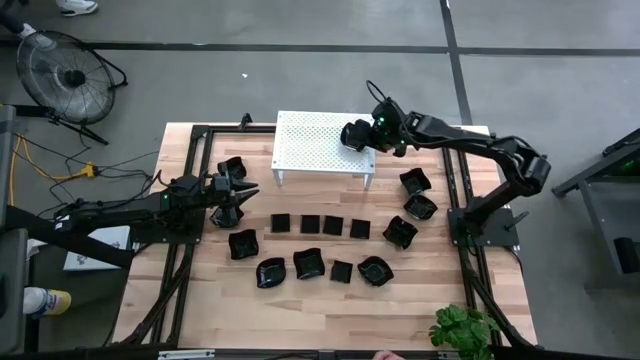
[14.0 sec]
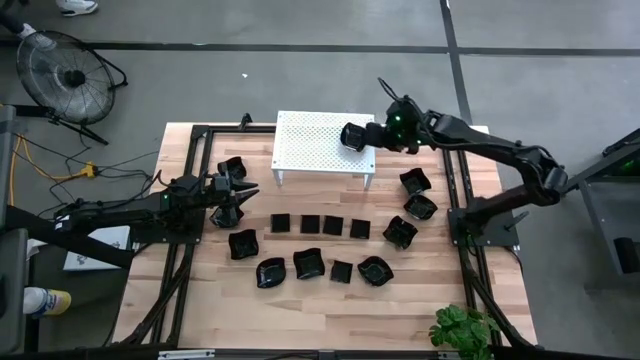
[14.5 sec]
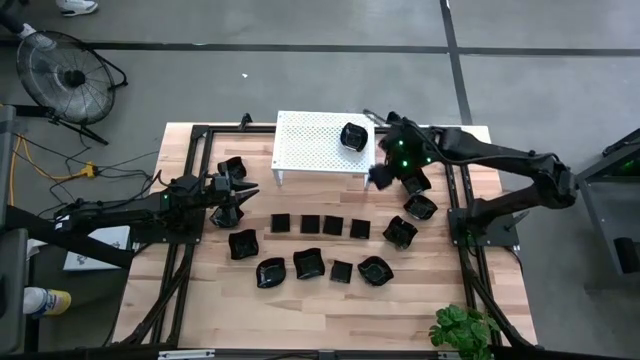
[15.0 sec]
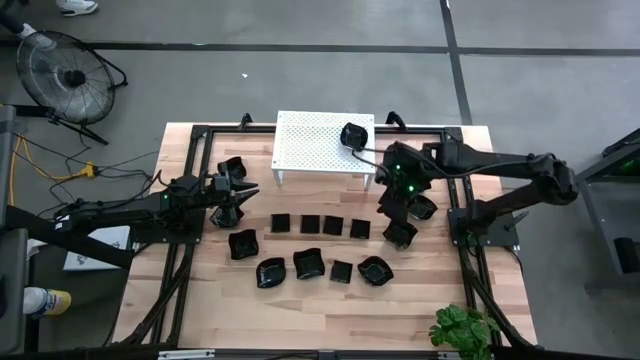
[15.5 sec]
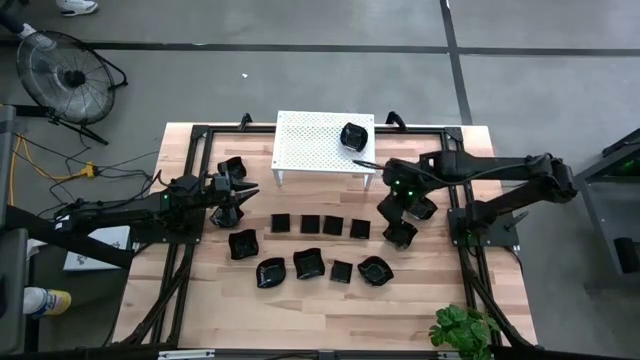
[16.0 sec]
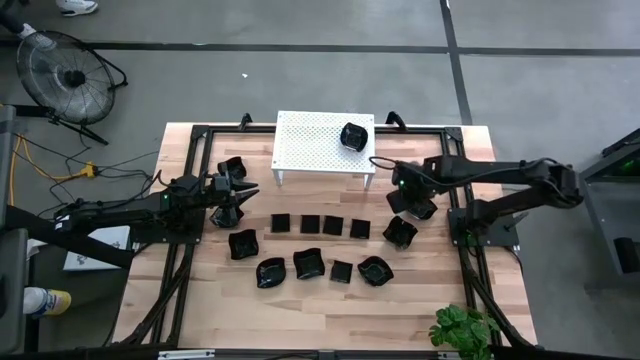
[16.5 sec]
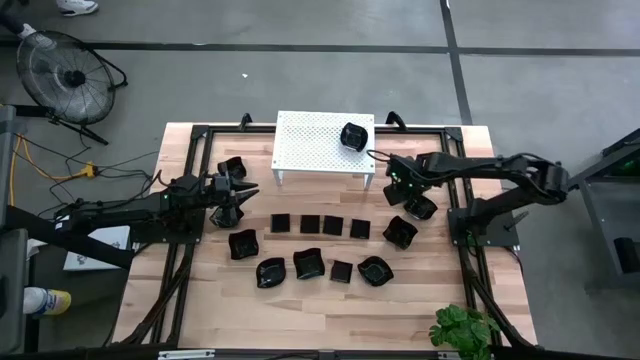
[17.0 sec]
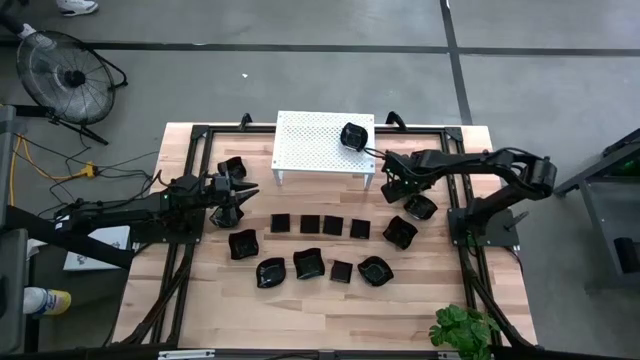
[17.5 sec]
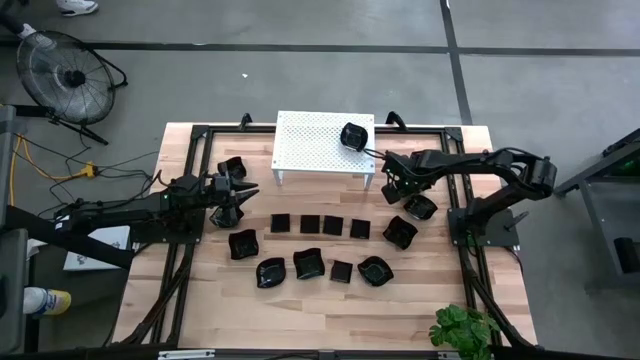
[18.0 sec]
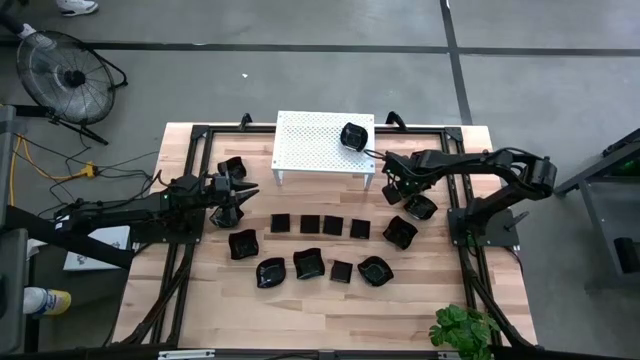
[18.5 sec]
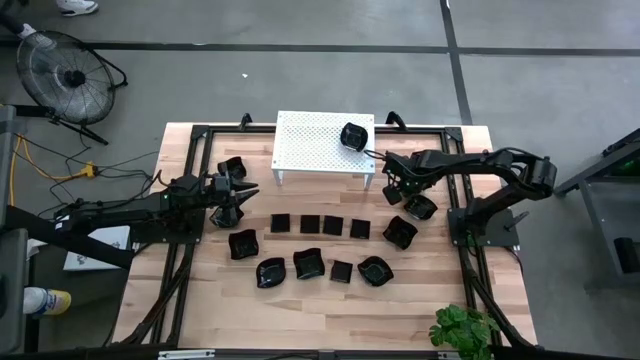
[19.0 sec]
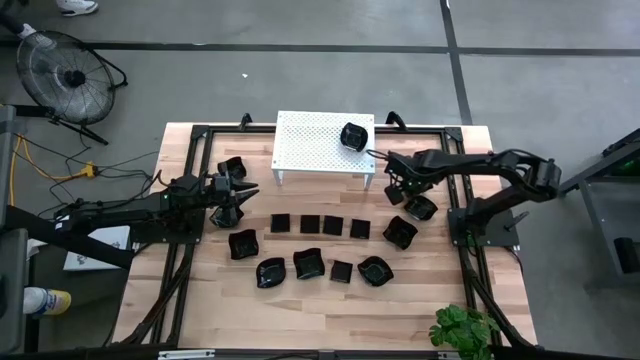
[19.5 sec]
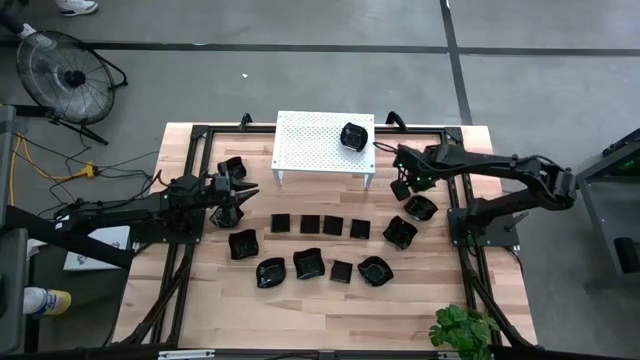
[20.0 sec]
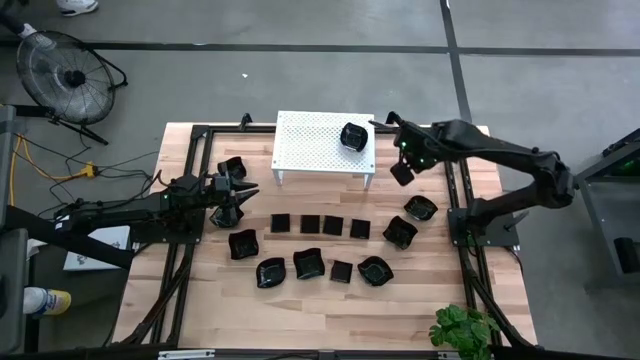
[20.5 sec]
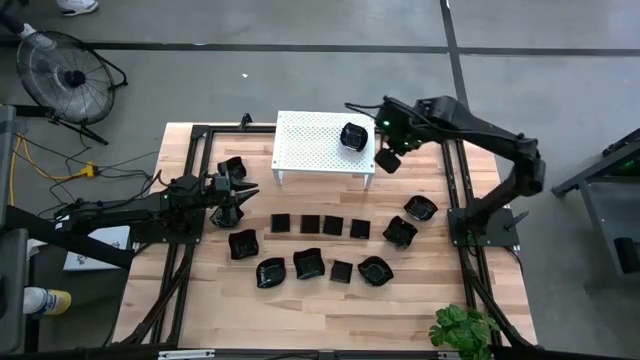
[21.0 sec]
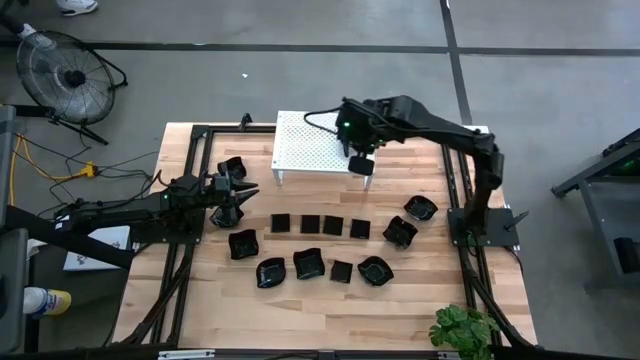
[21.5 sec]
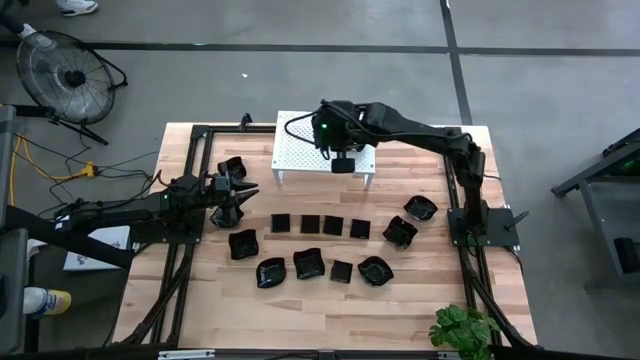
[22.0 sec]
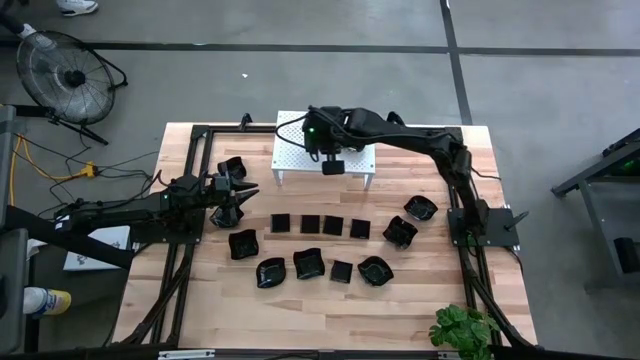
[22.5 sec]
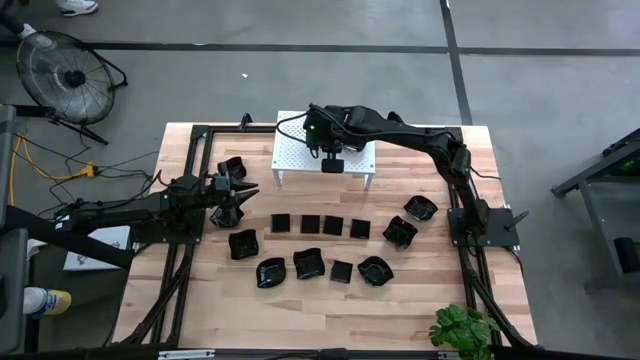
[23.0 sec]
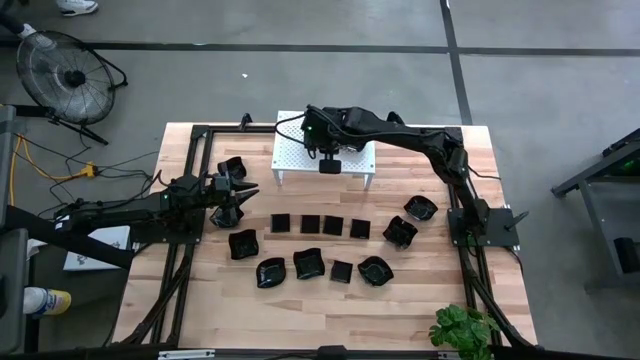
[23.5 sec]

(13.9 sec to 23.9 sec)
Task: Pick & Place Mini shaped plates
Put the distorted square plate on the shelf

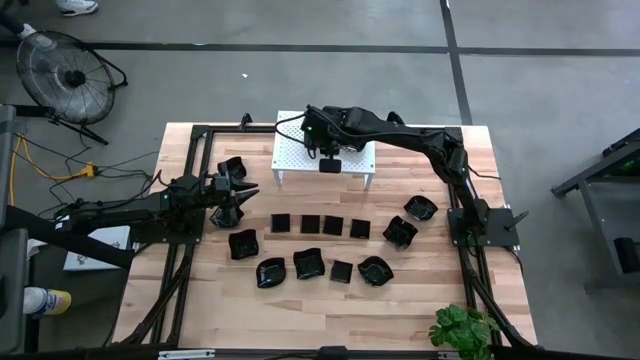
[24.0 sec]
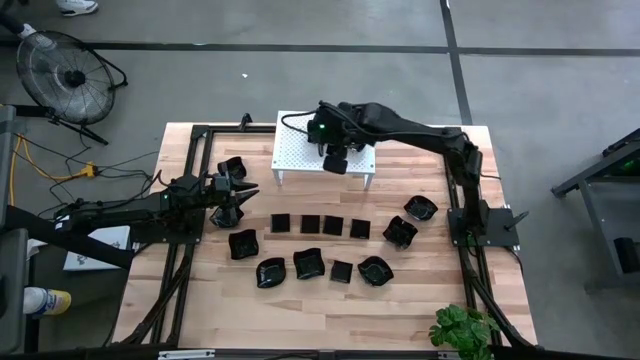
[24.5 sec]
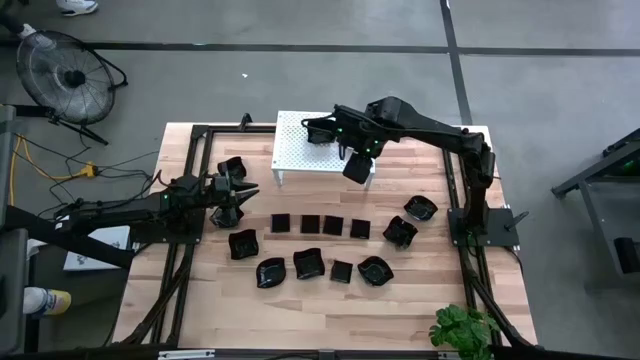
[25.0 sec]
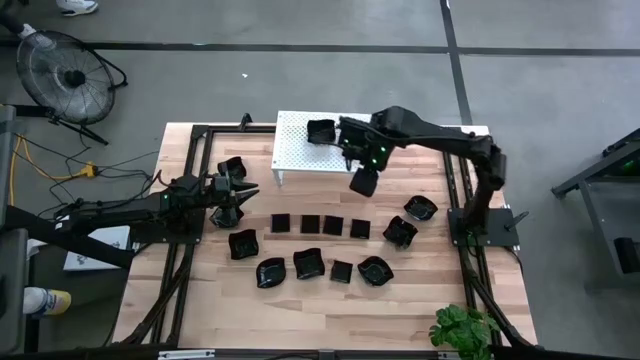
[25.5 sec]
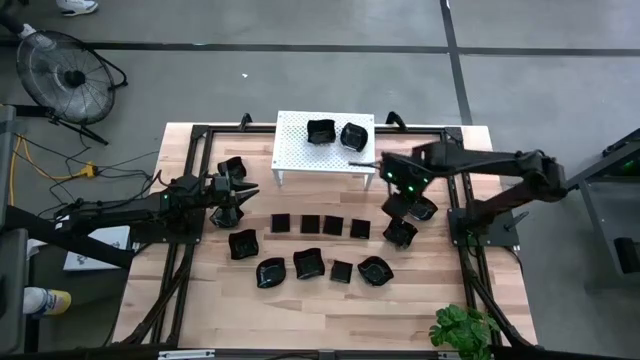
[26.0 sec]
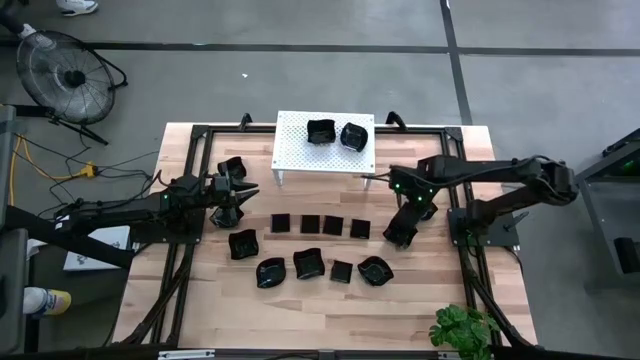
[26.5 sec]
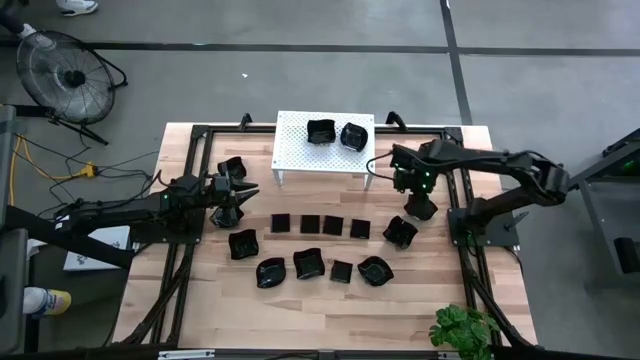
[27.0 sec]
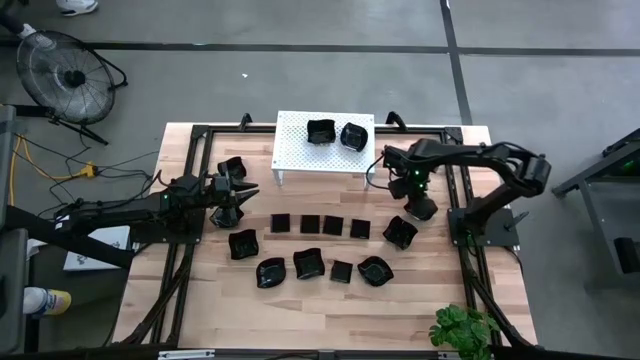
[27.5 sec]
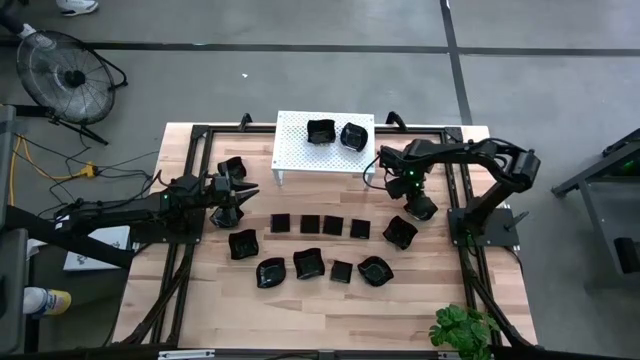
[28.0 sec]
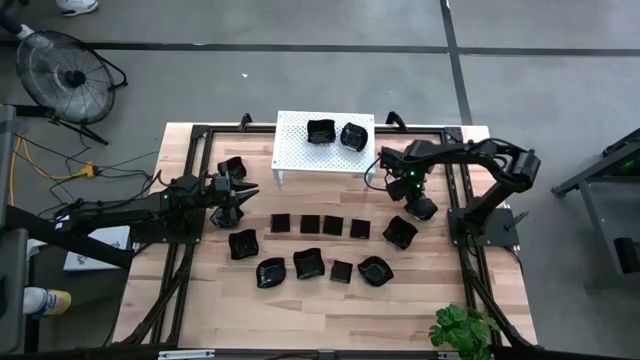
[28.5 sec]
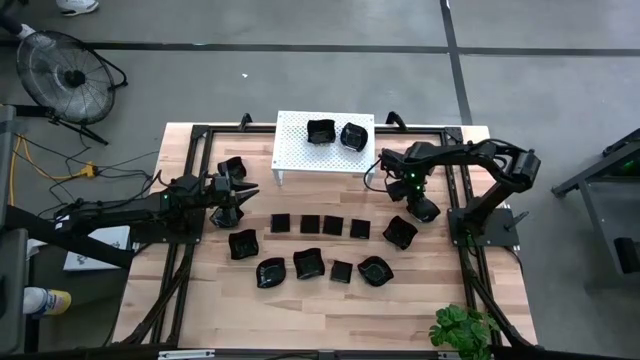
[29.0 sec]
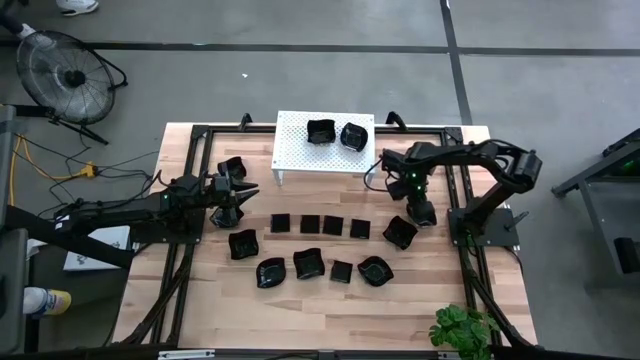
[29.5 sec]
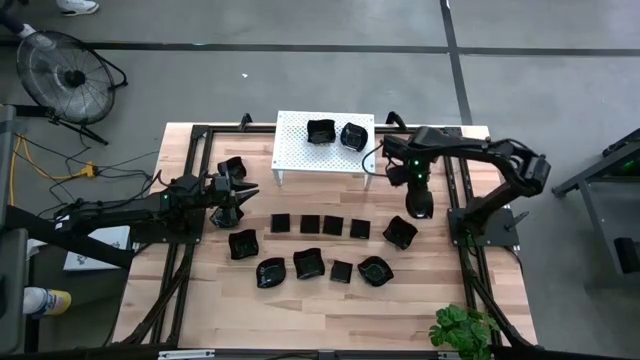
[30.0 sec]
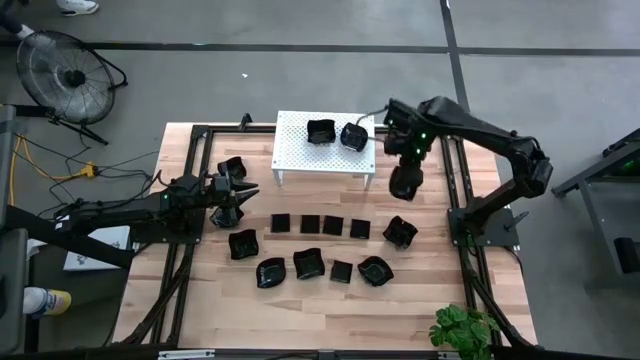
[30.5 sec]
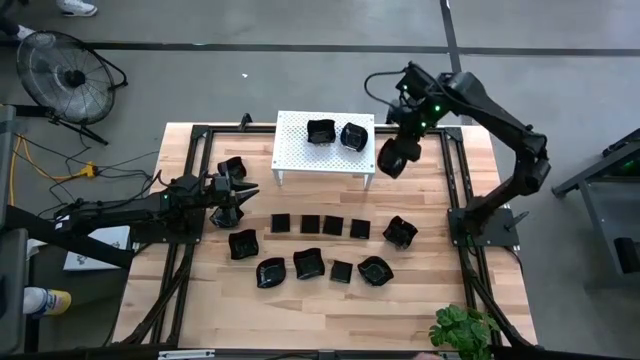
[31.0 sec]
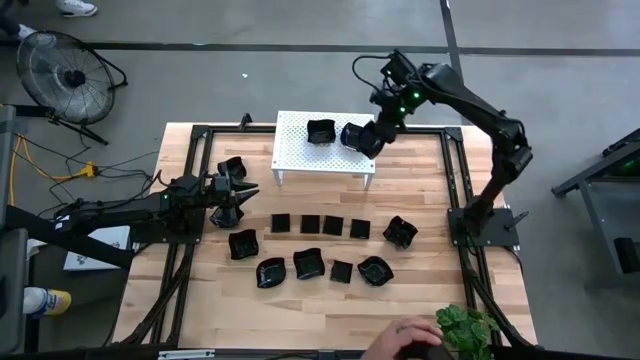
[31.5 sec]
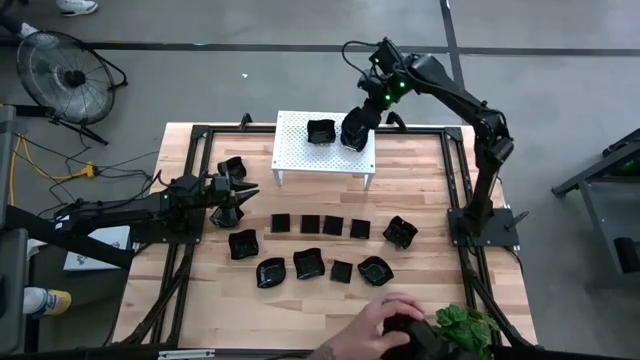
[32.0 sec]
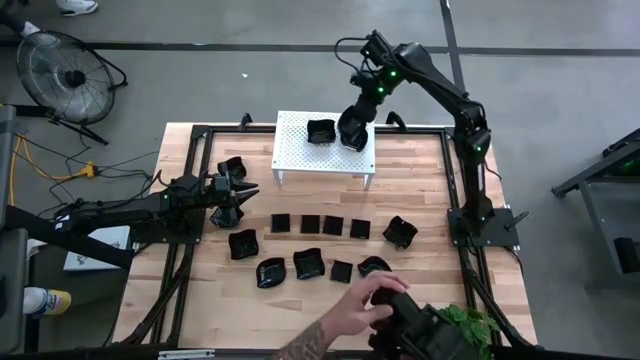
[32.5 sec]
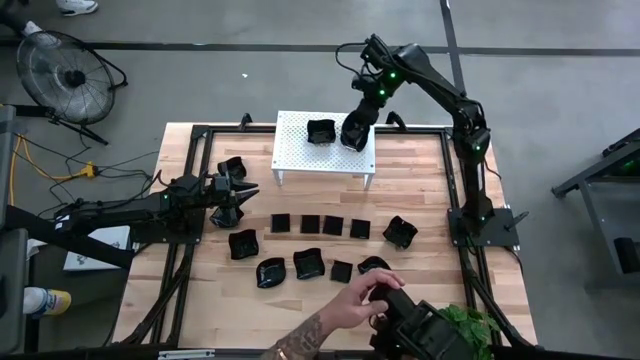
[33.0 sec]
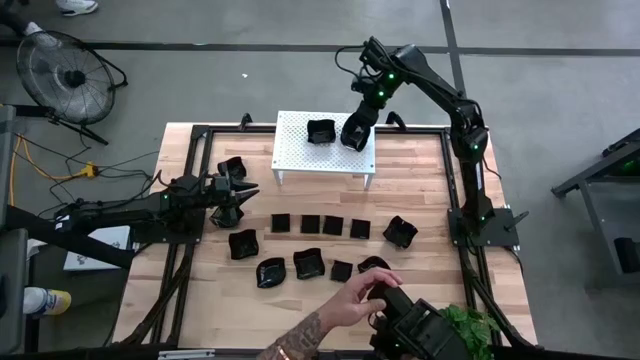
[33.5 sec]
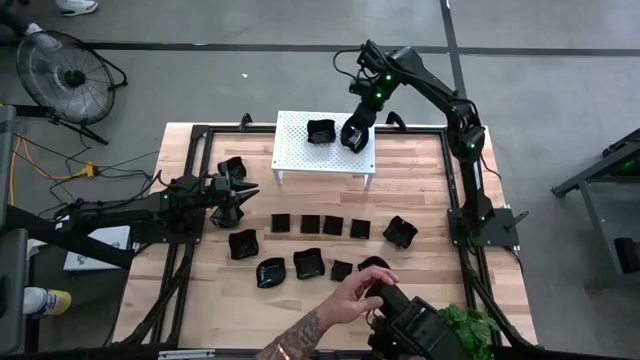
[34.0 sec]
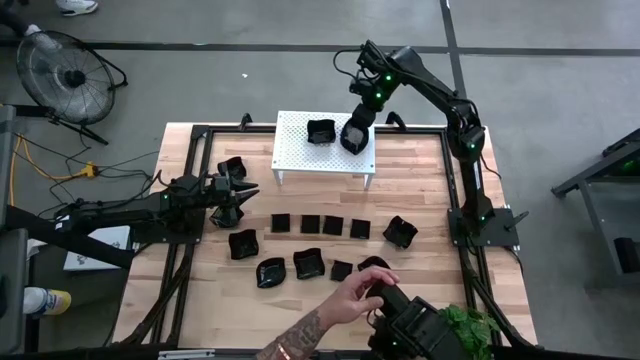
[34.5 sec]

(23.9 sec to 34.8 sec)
Stack the leaf shaped plate on top of the other leaf shaped plate on the shelf
